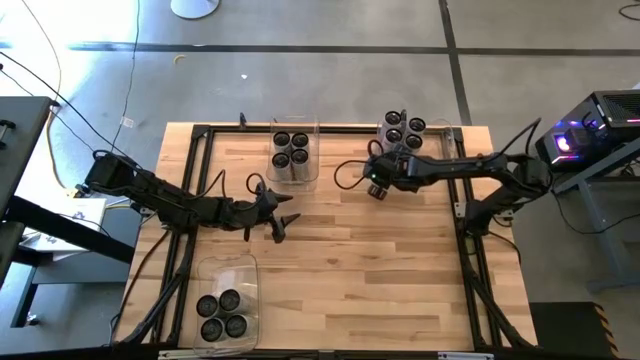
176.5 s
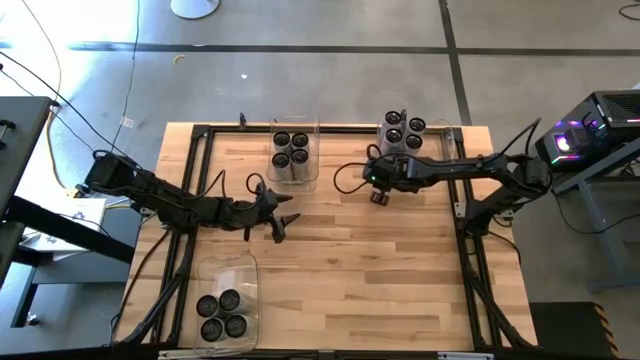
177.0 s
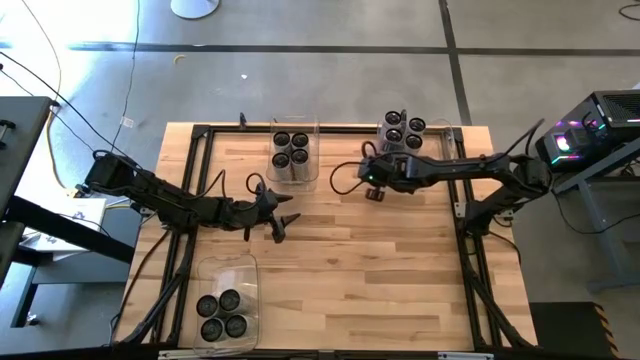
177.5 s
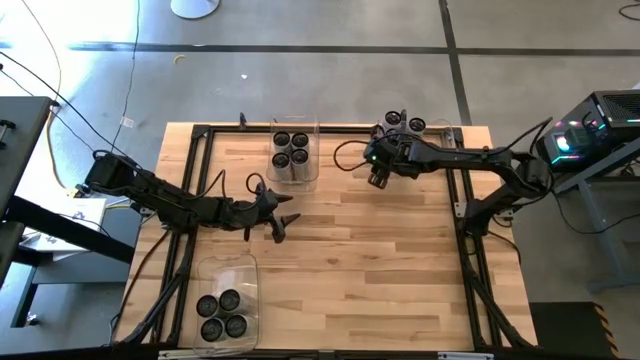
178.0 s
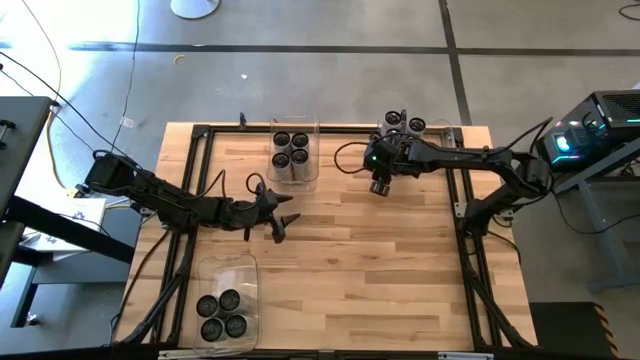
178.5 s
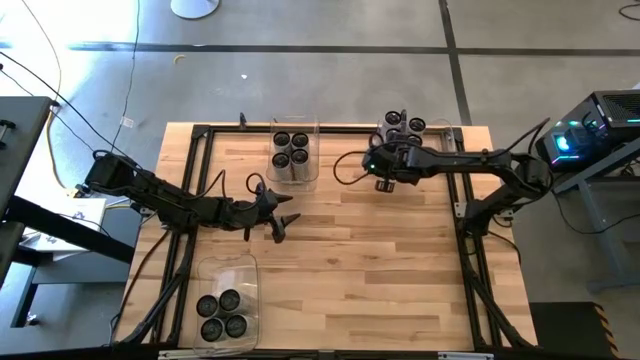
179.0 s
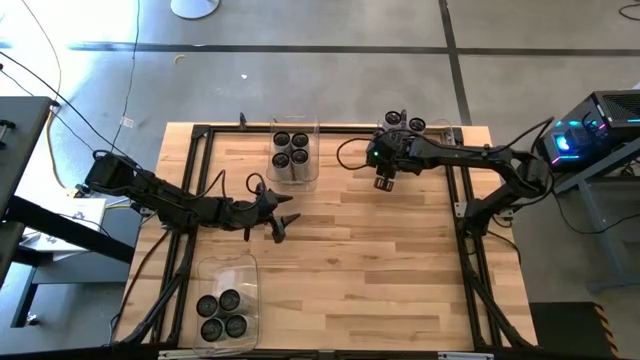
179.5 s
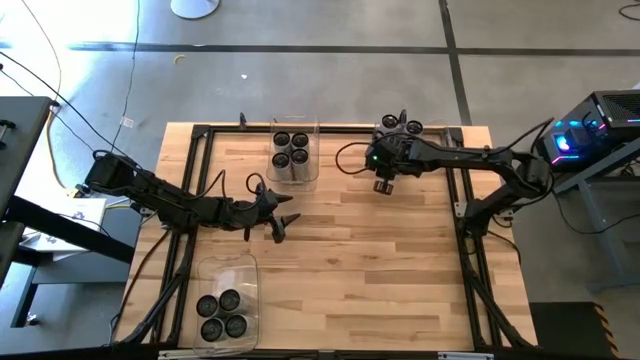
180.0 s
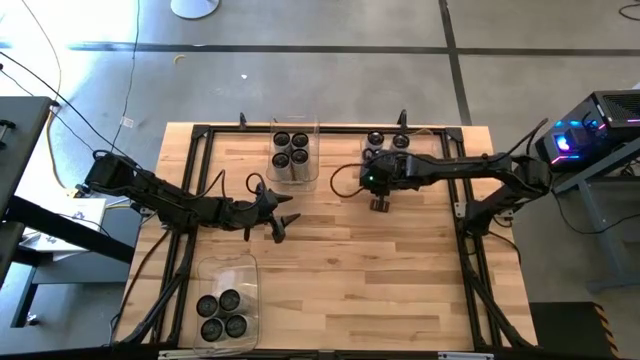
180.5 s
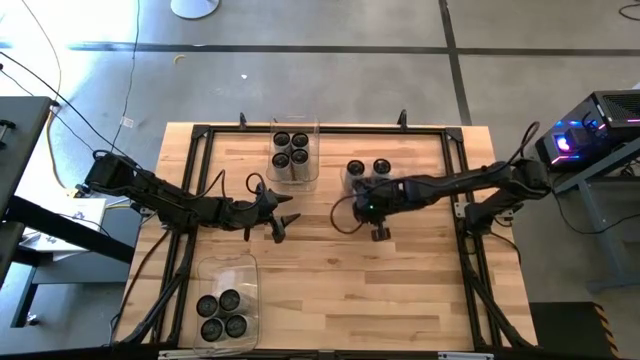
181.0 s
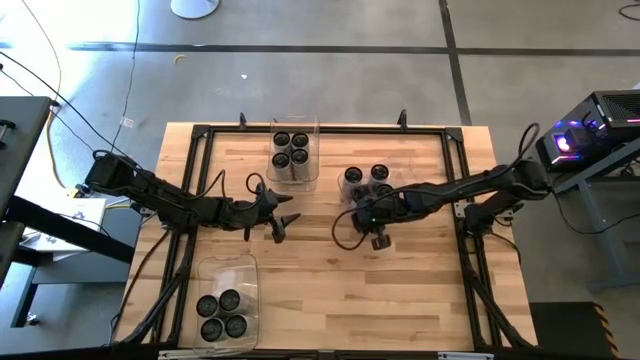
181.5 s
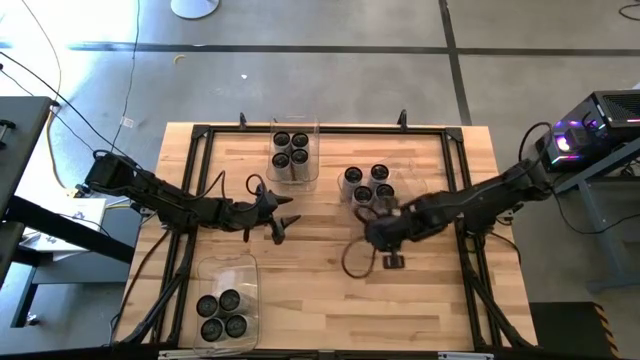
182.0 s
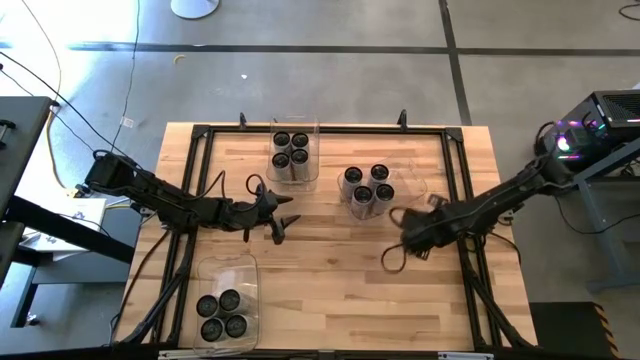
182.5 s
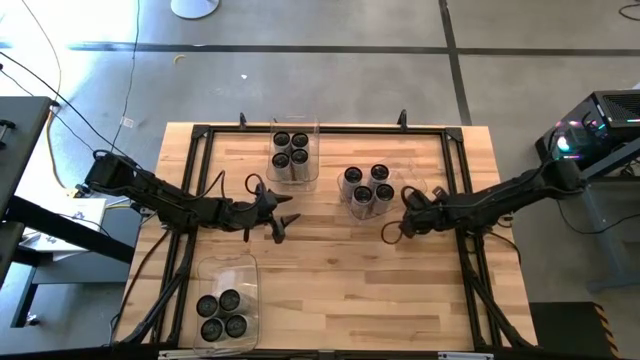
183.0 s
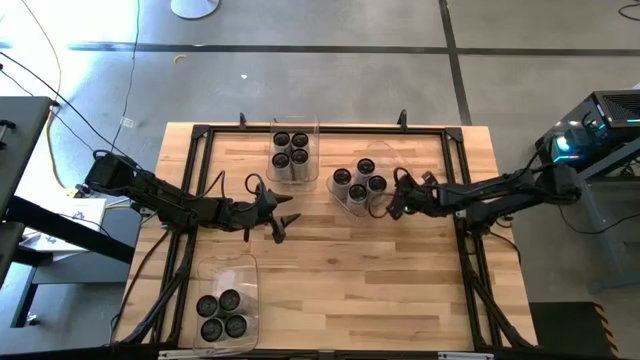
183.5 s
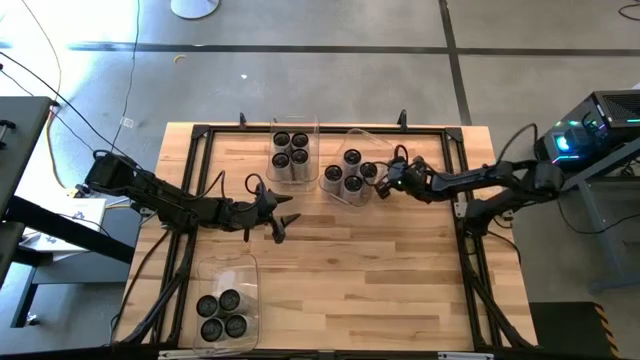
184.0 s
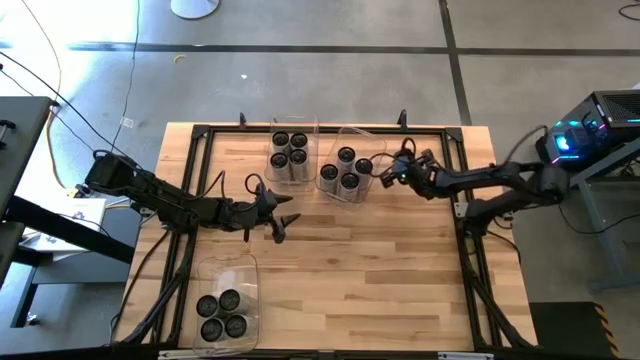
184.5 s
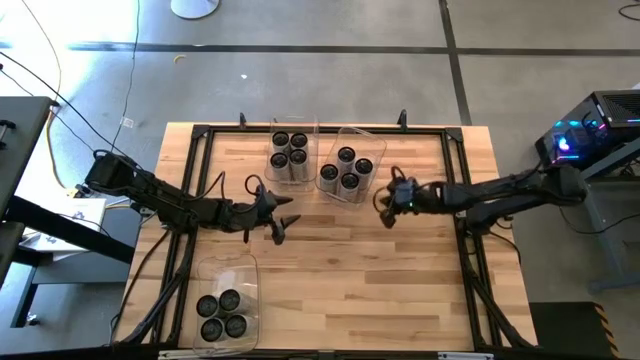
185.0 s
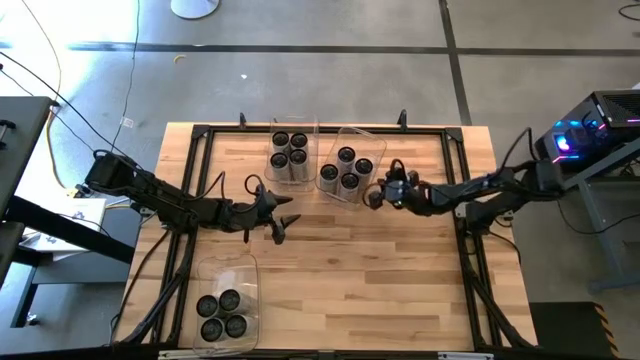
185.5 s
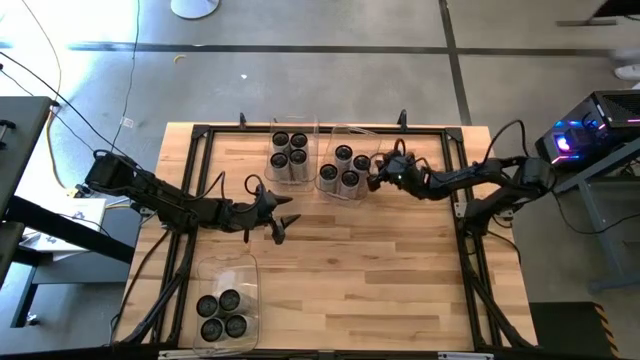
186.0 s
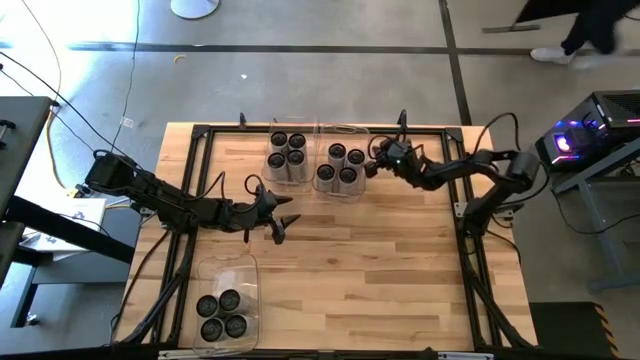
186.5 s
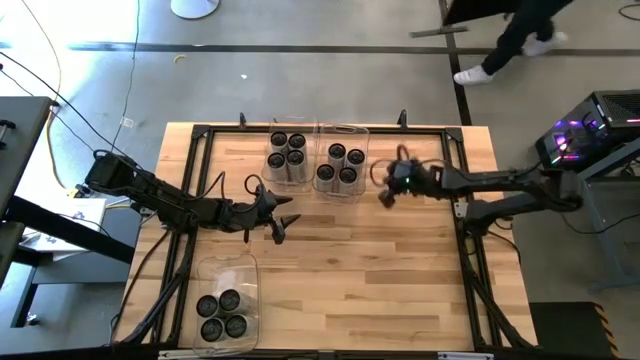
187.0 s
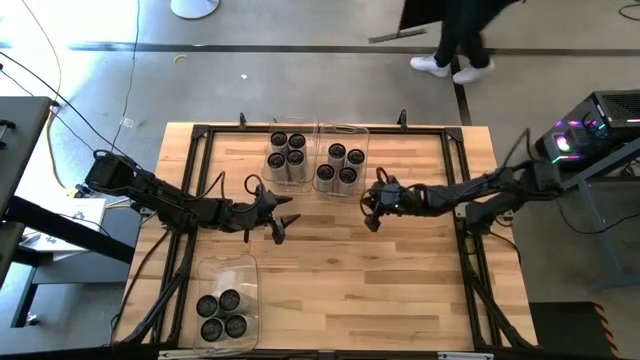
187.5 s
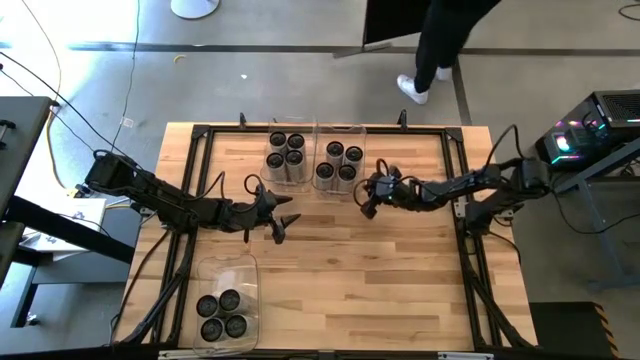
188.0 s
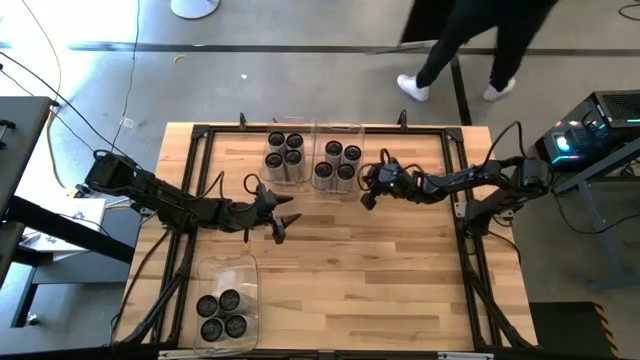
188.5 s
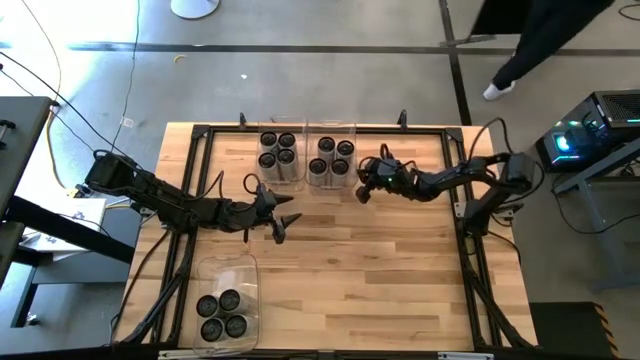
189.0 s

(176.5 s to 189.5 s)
Task: Sort soda cans
Adjust the top left and right transparent bins

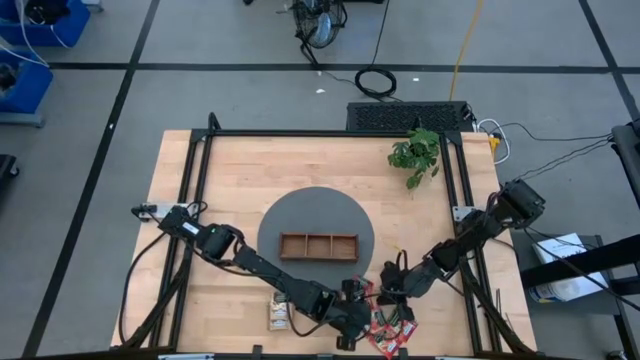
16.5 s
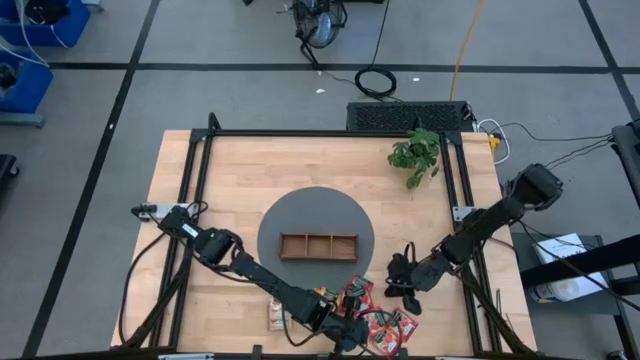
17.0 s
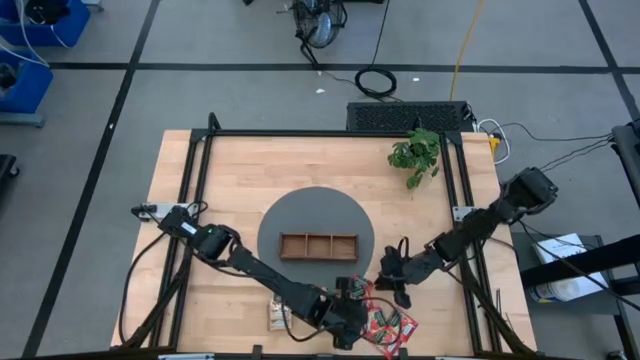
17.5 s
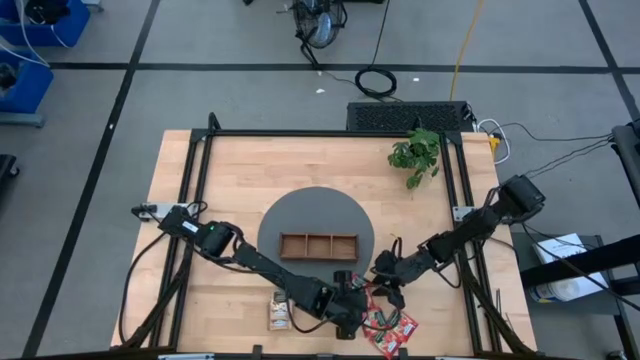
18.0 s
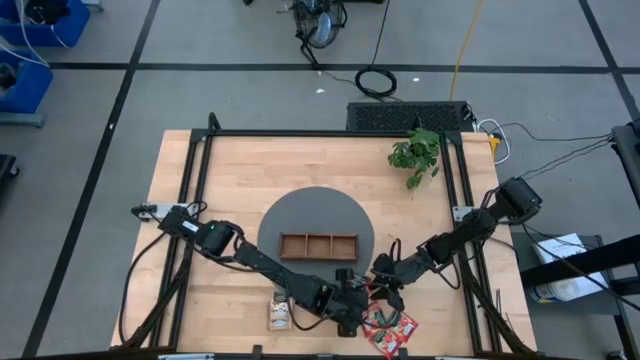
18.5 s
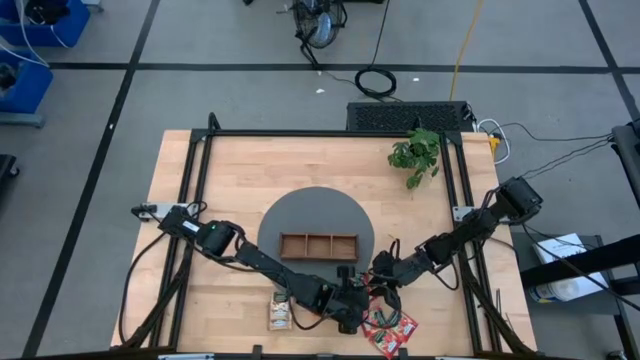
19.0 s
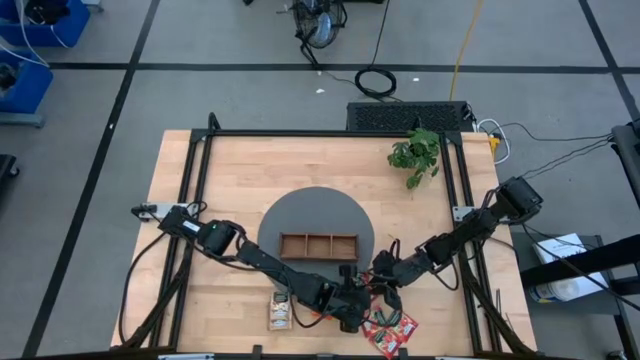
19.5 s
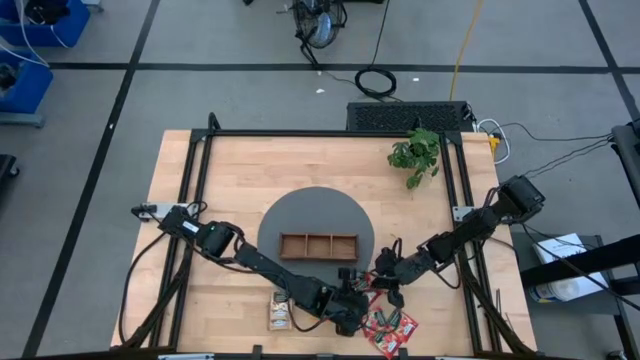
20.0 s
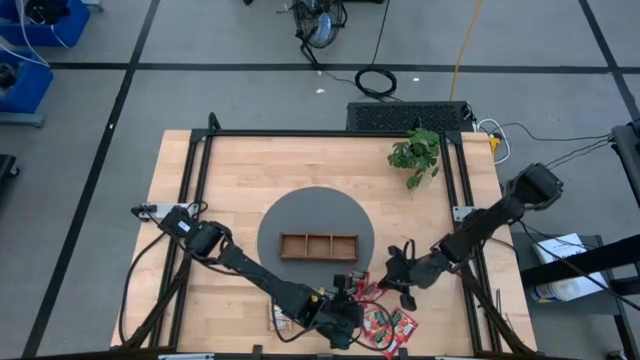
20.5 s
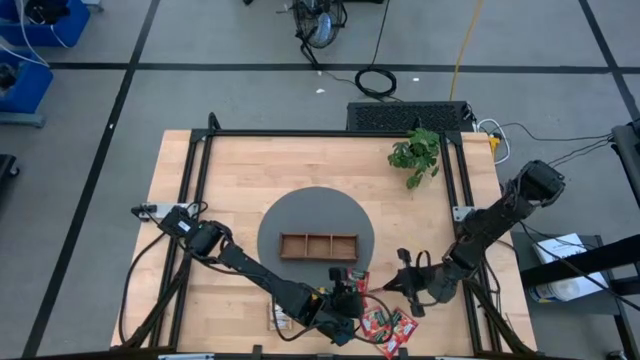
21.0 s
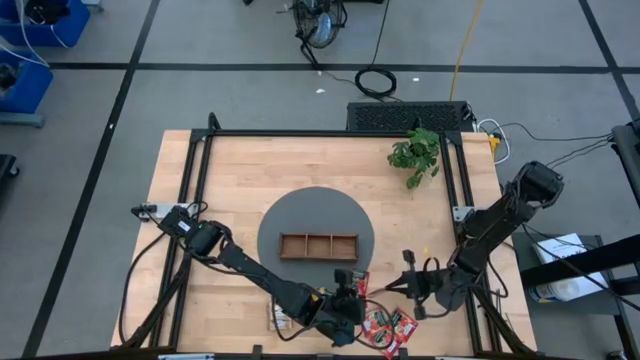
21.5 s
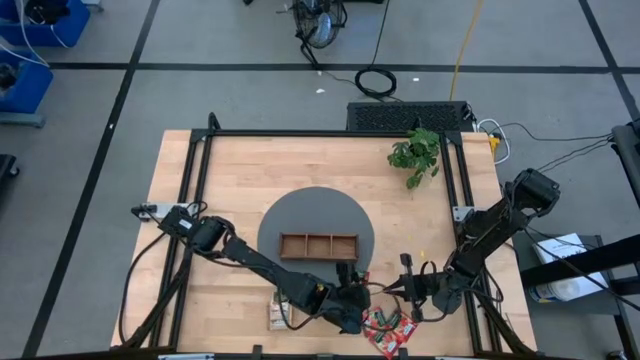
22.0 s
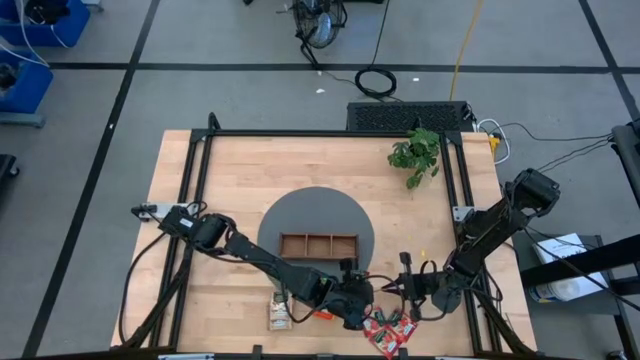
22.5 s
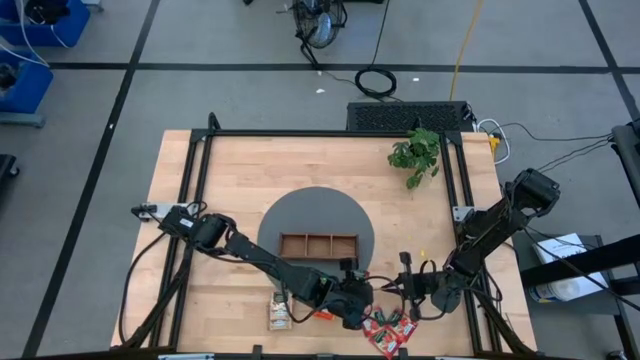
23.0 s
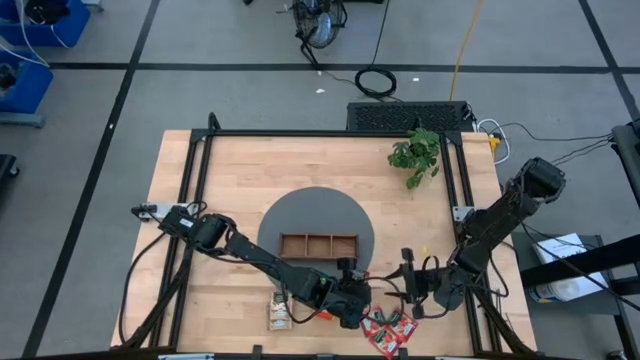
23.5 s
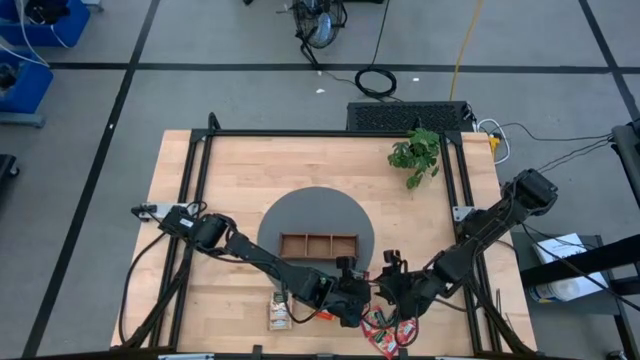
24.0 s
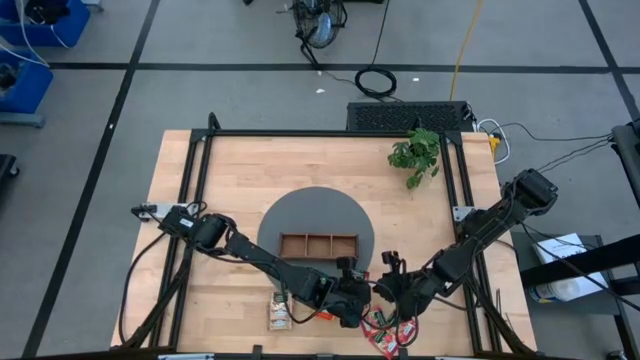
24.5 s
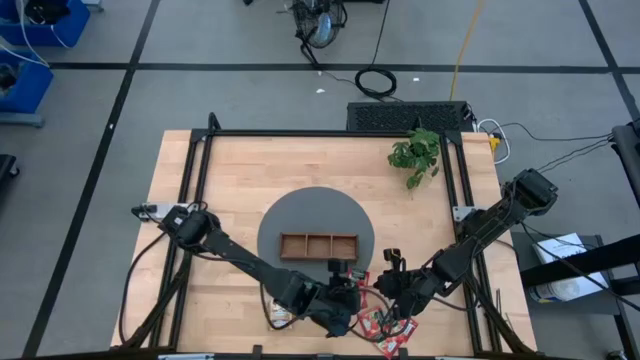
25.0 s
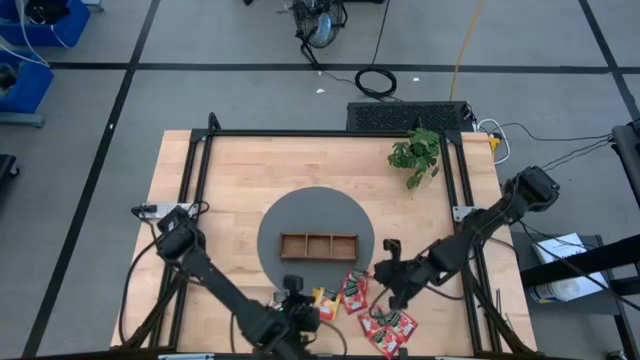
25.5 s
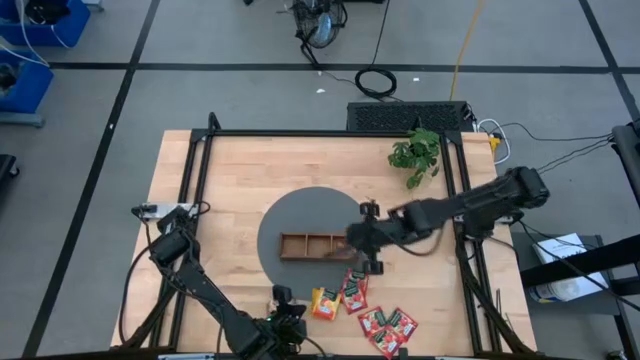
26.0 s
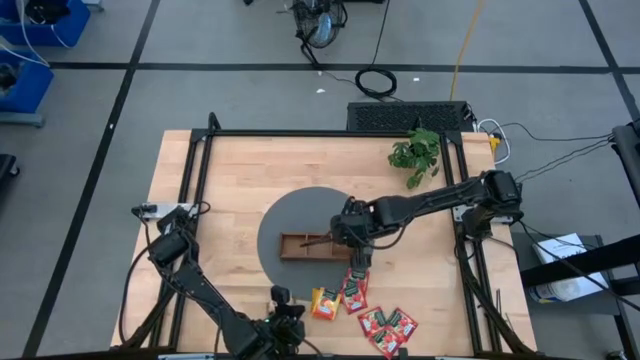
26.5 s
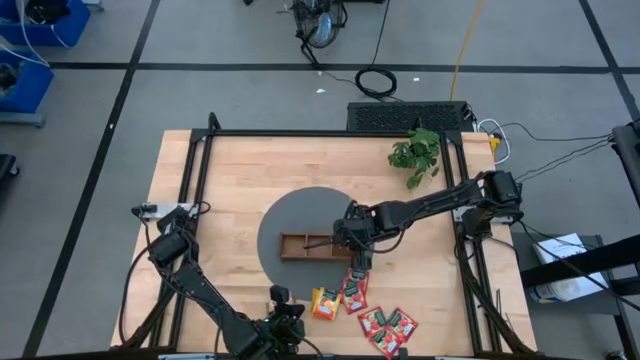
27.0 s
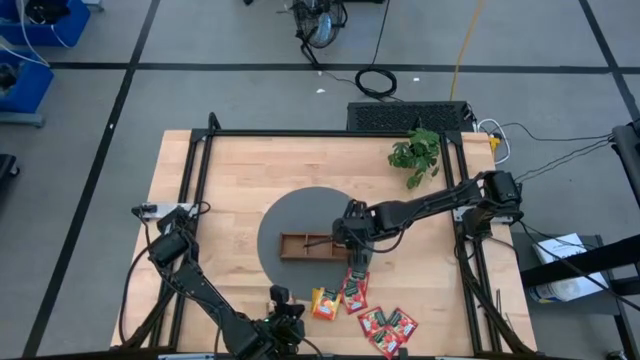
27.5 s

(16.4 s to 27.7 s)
Task: Pick & Place Tea
Put the red tea sachet into the right section of the wooden organizer
